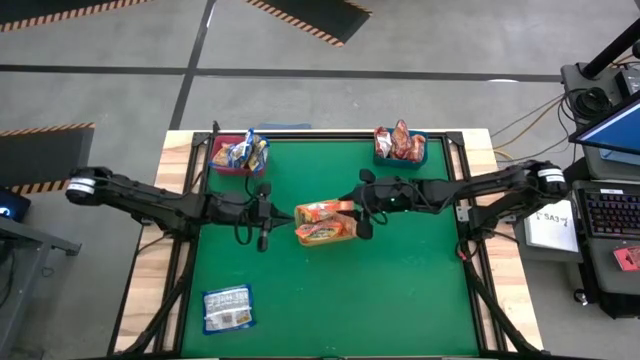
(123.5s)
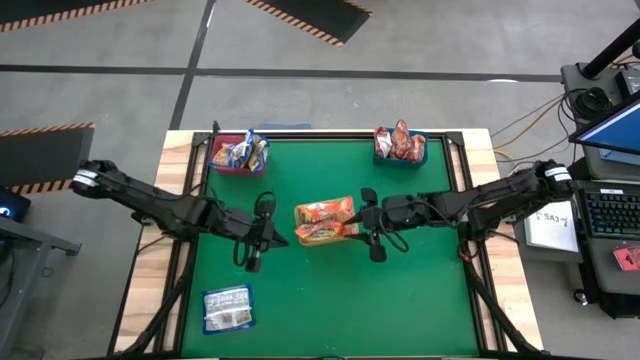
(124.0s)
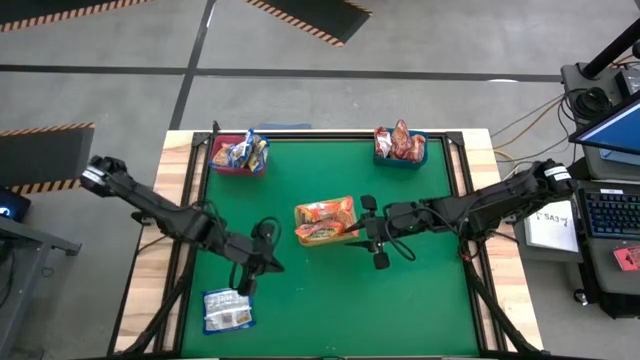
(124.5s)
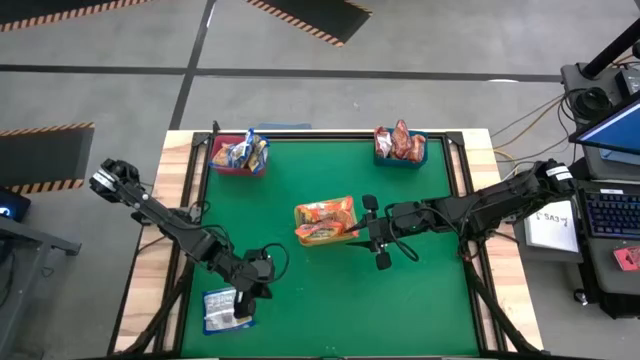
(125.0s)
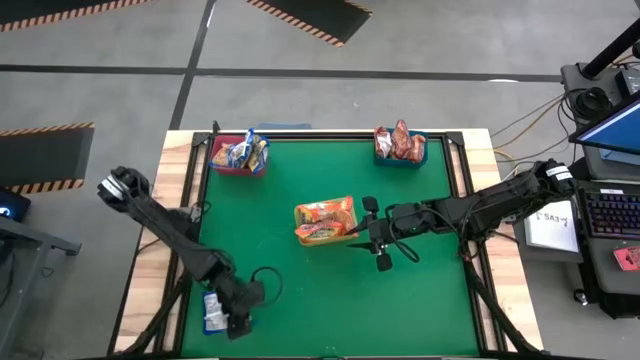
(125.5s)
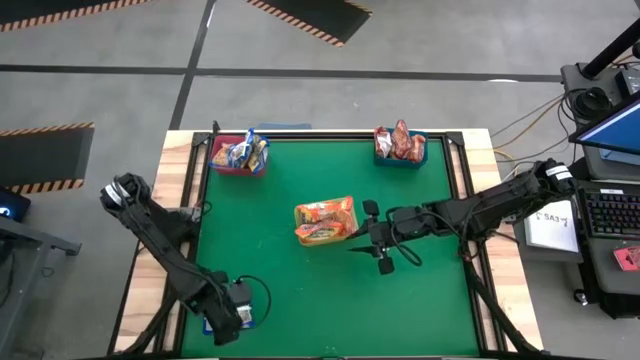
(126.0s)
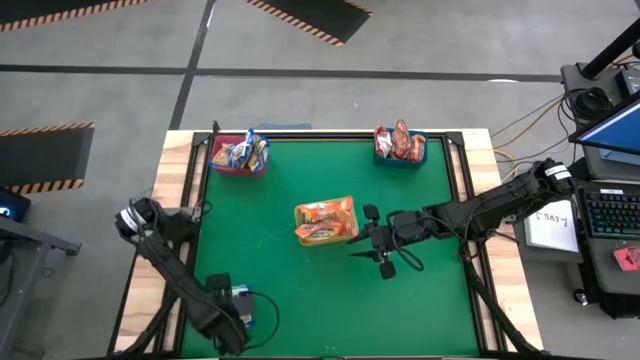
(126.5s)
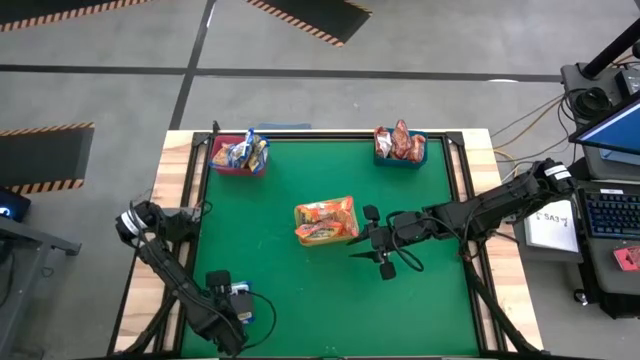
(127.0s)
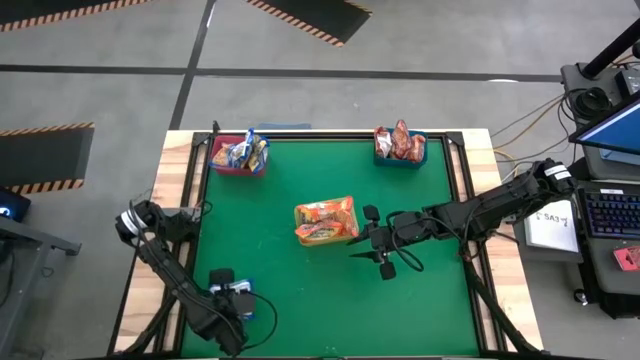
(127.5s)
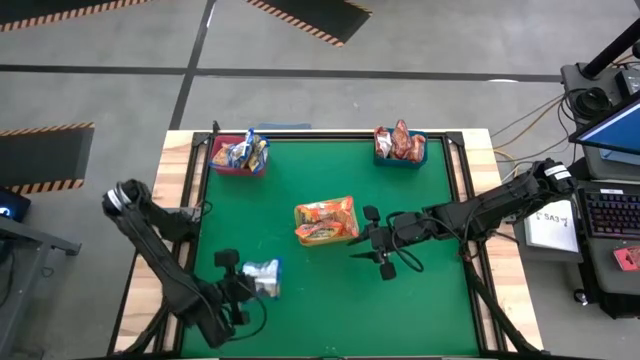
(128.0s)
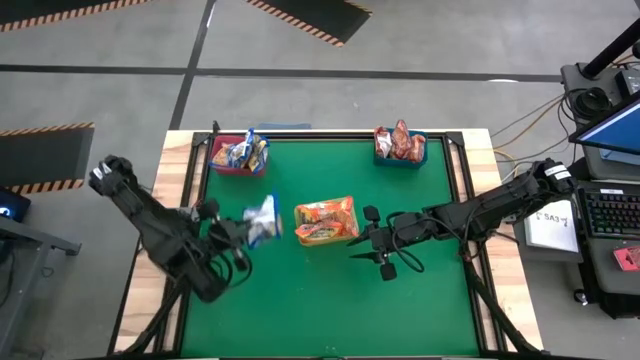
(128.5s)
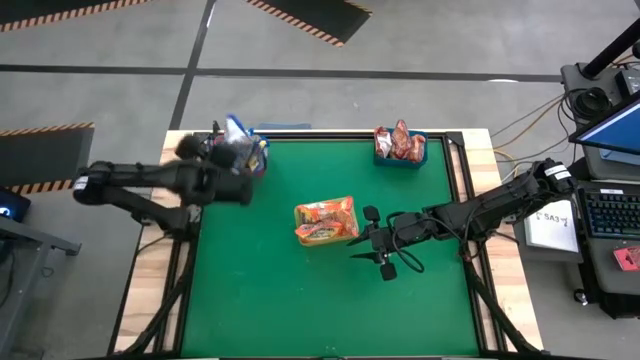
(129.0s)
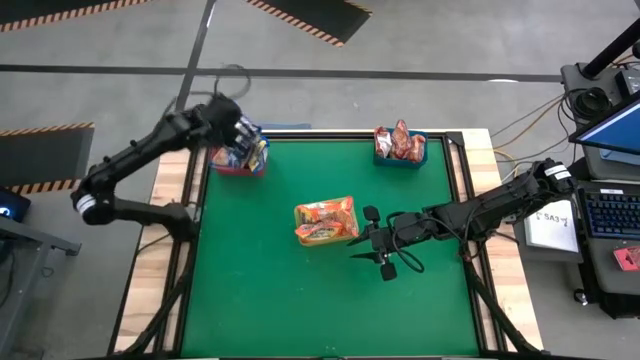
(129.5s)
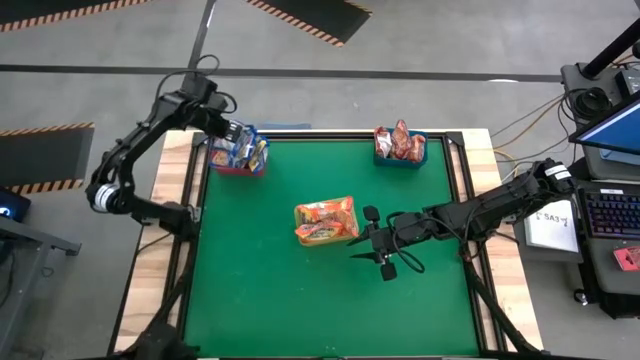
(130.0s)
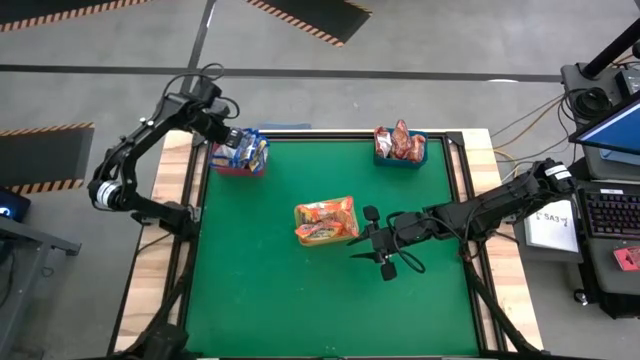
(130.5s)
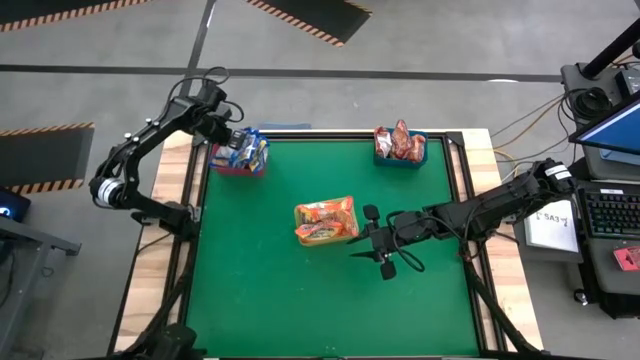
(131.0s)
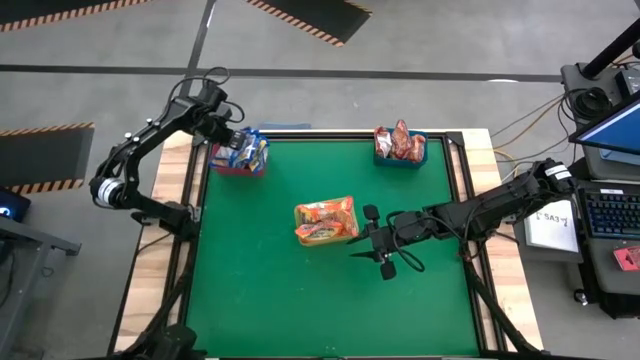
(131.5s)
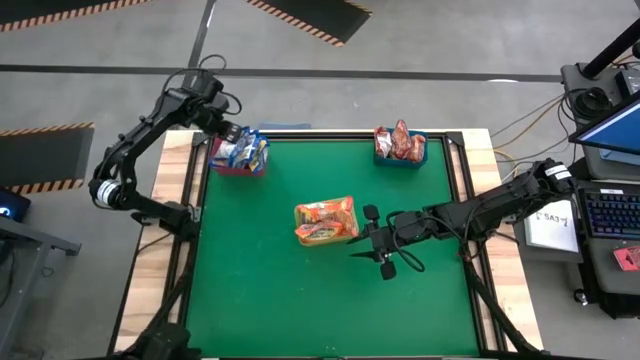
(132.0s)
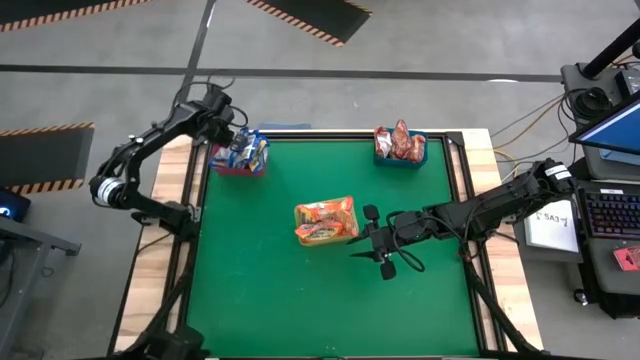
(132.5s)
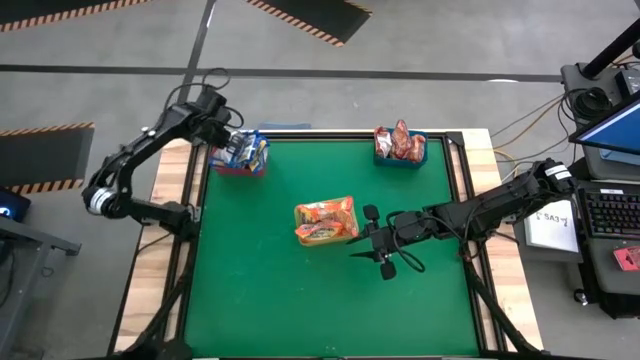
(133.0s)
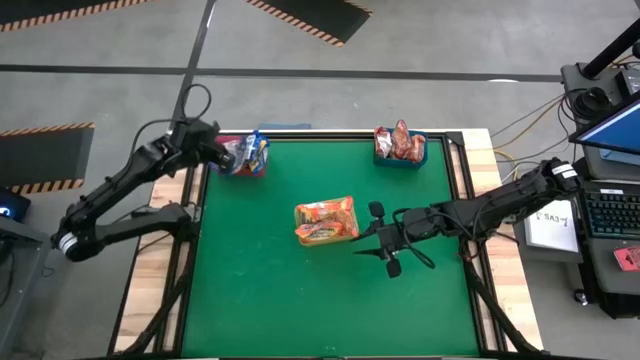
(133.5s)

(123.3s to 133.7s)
Task: Sort Maruchan noodles
Put the blue noodle pack into the red bin

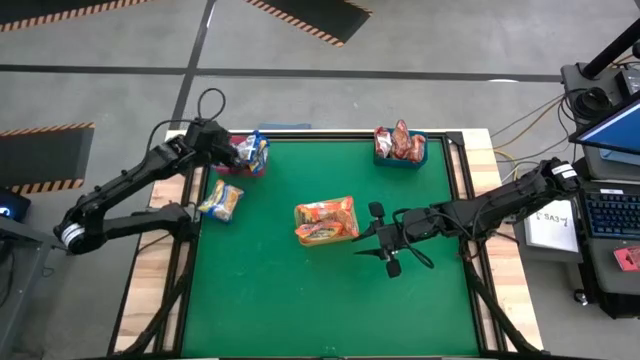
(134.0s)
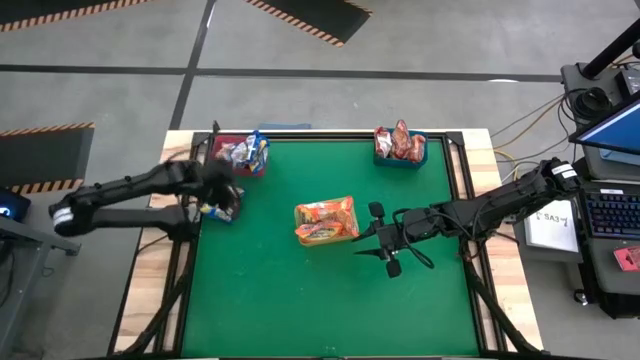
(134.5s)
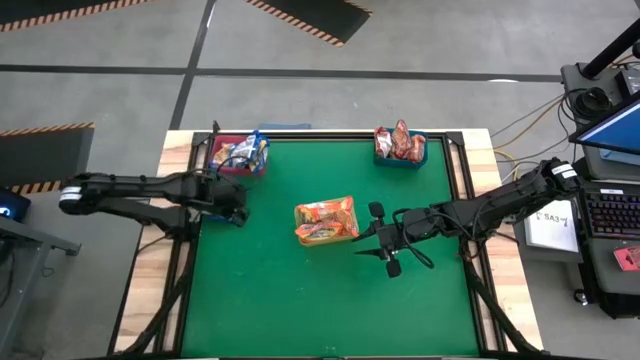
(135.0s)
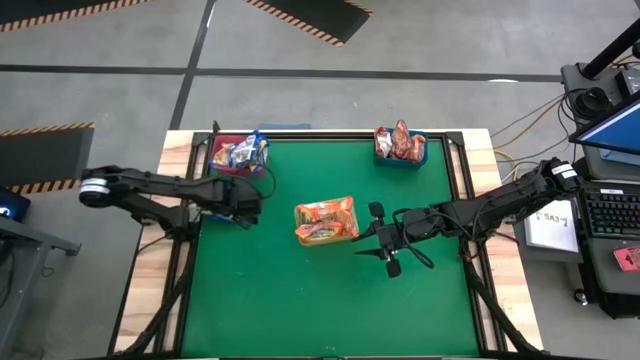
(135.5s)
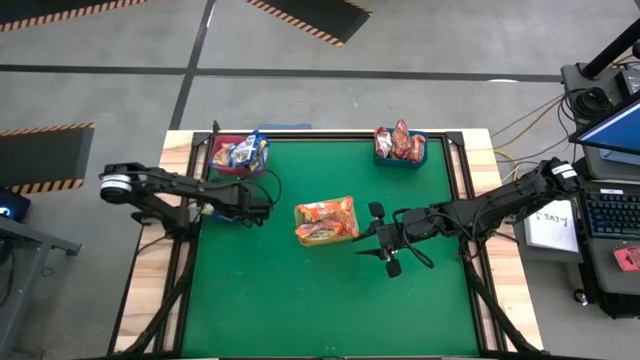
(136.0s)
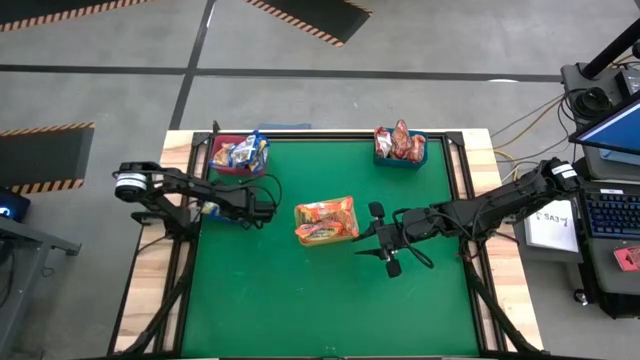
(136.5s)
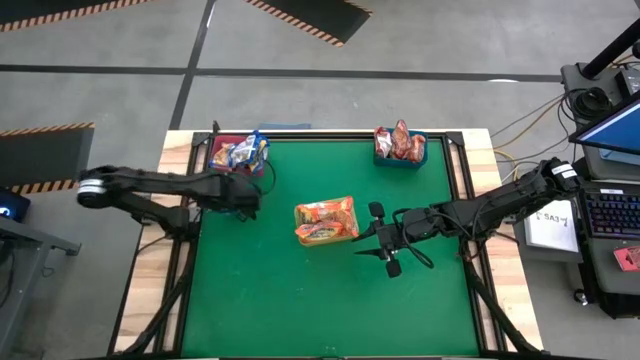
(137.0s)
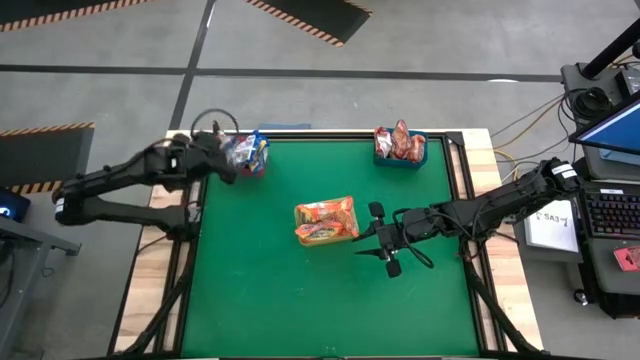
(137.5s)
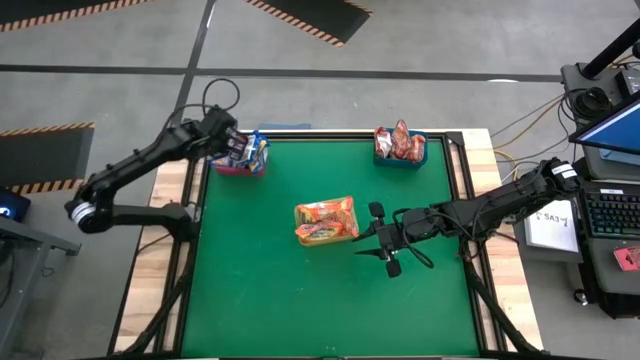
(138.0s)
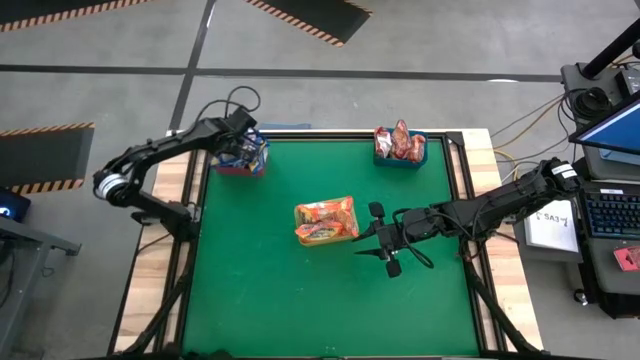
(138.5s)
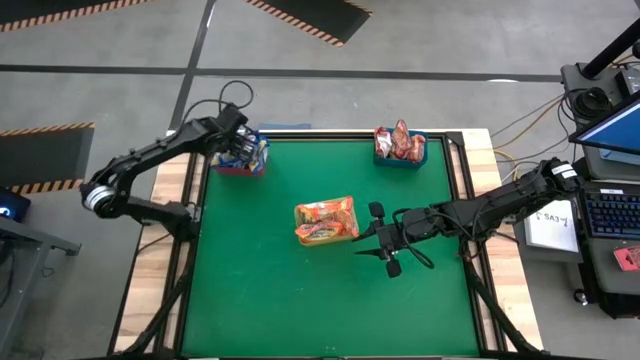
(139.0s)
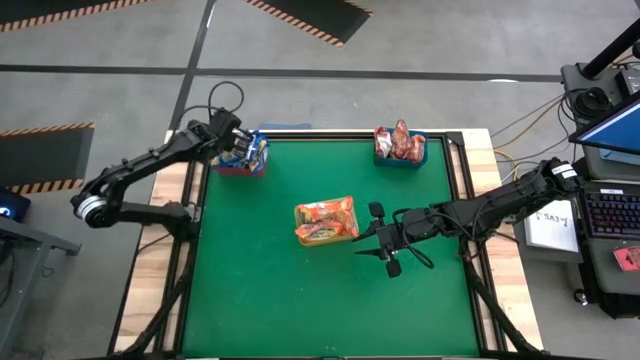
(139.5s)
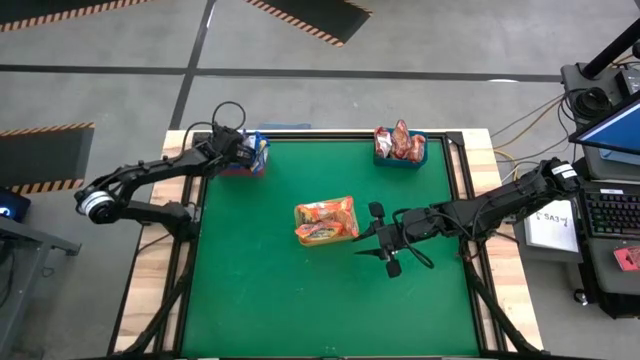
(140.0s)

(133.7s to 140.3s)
Put the blue noodle pack into the red bin

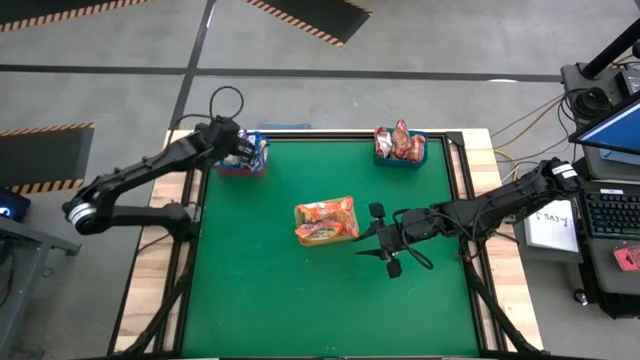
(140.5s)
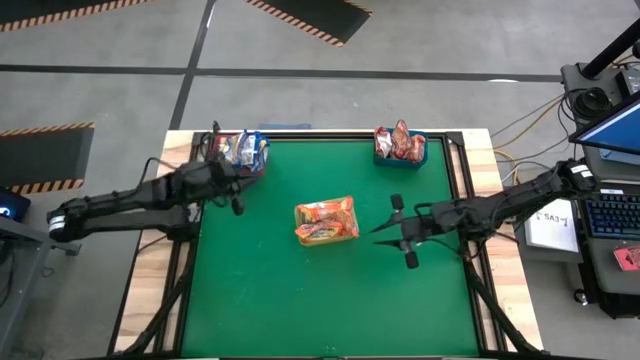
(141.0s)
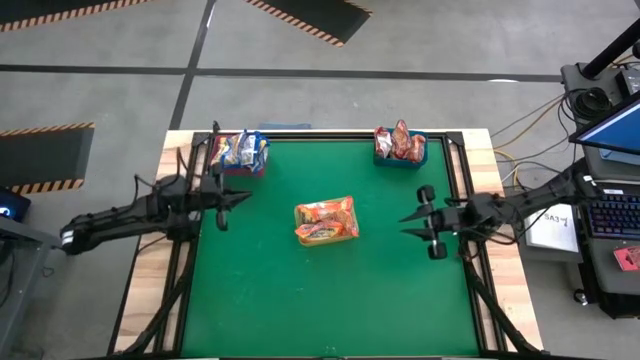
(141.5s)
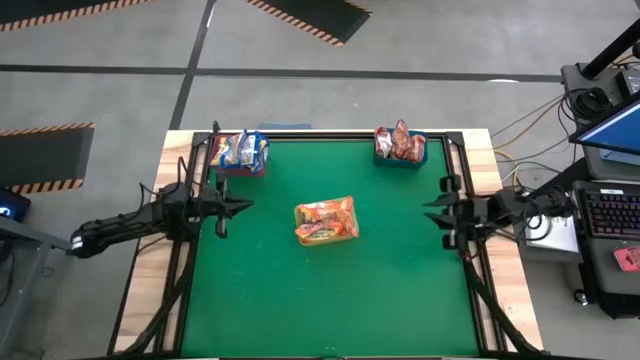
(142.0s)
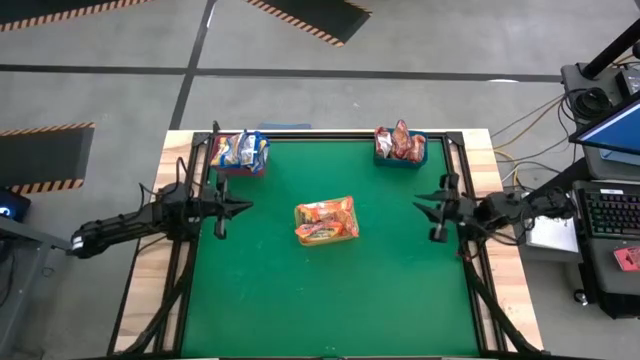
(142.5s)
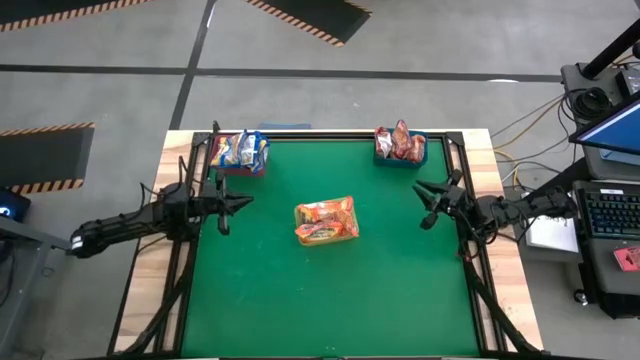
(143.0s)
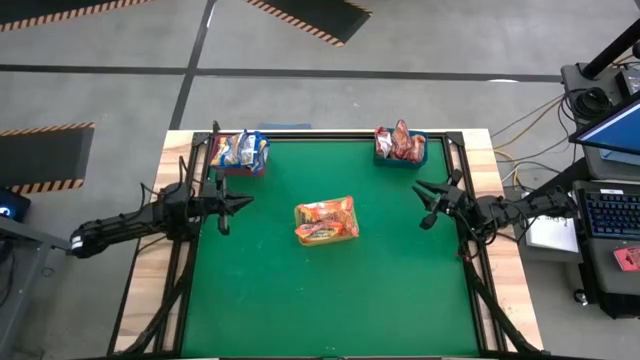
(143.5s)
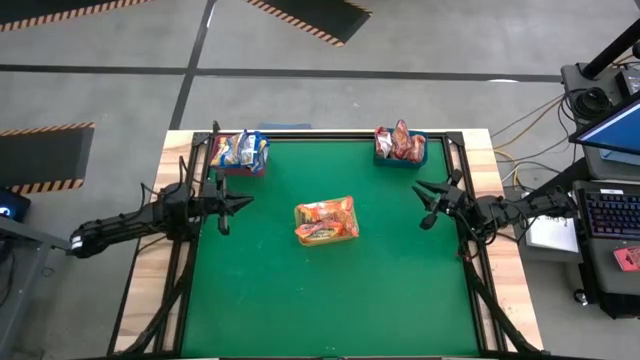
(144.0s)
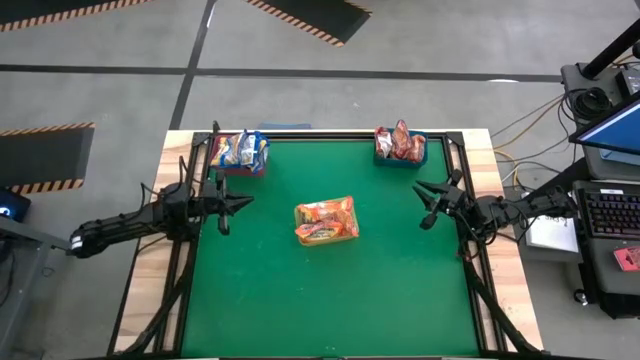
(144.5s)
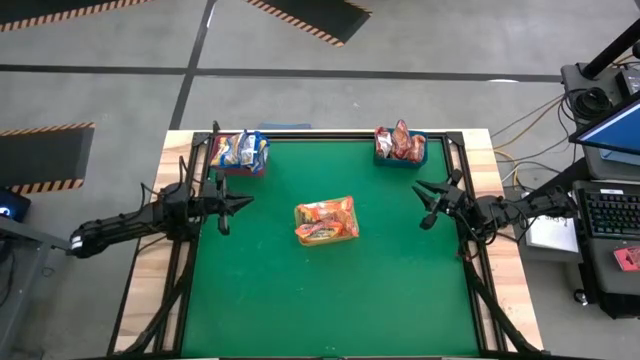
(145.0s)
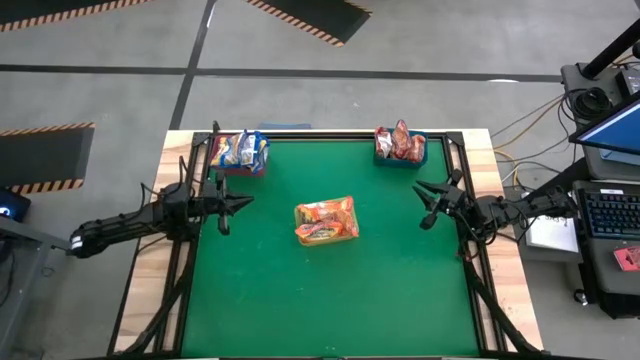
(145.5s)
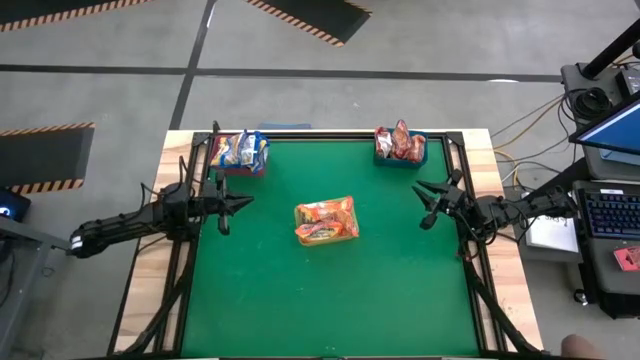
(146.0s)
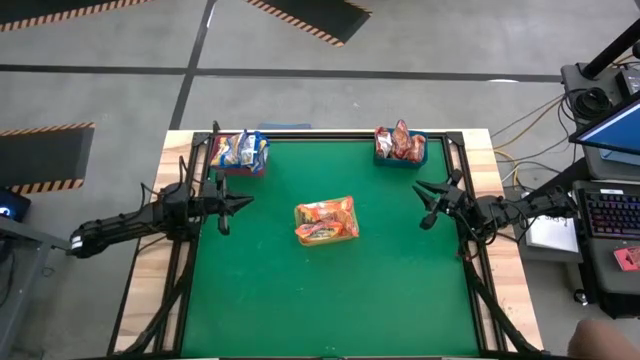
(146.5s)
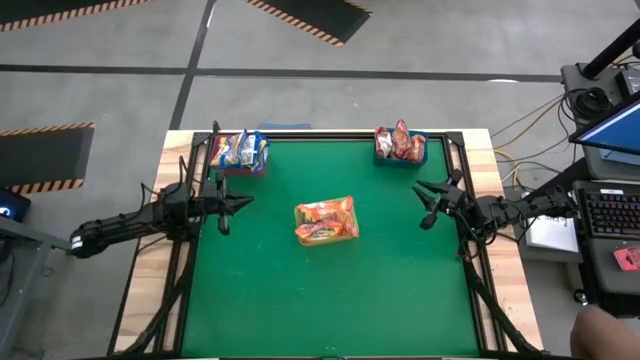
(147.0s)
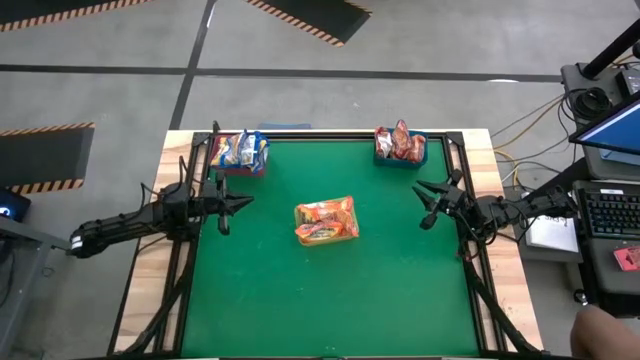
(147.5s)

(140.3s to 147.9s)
Return to Home Position
